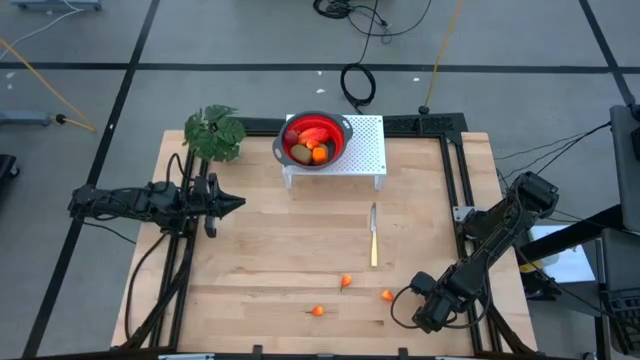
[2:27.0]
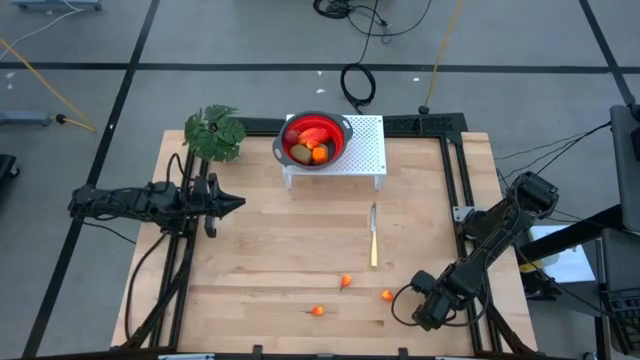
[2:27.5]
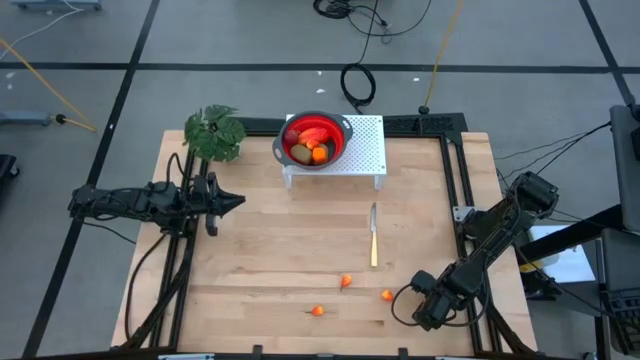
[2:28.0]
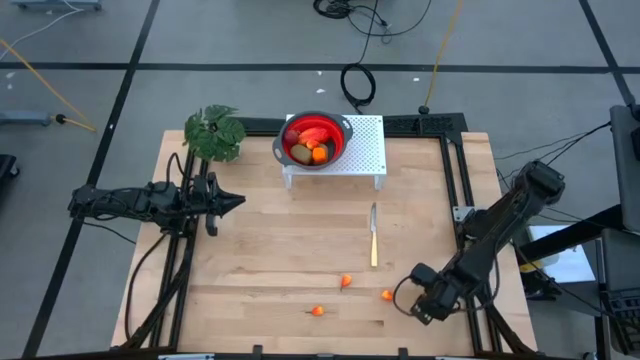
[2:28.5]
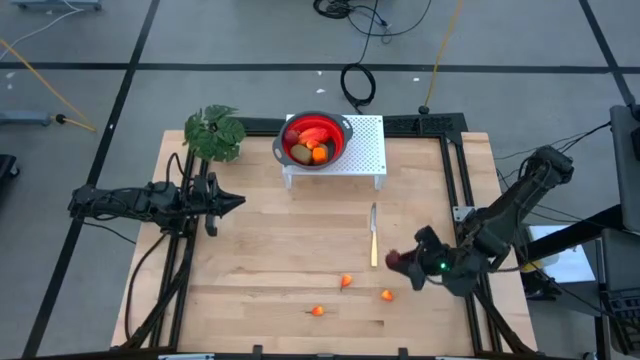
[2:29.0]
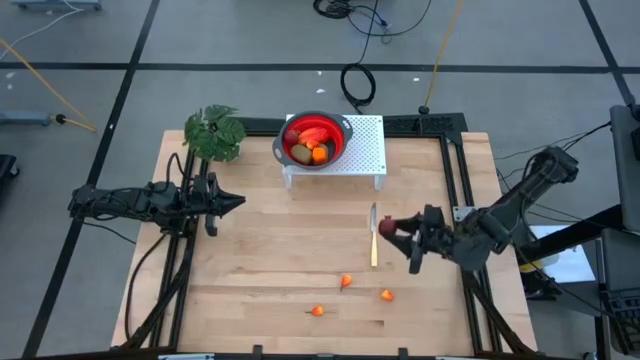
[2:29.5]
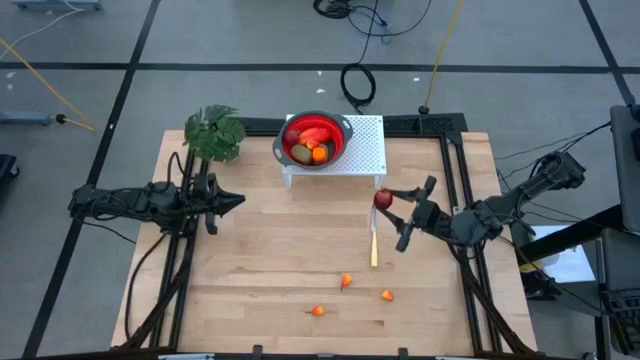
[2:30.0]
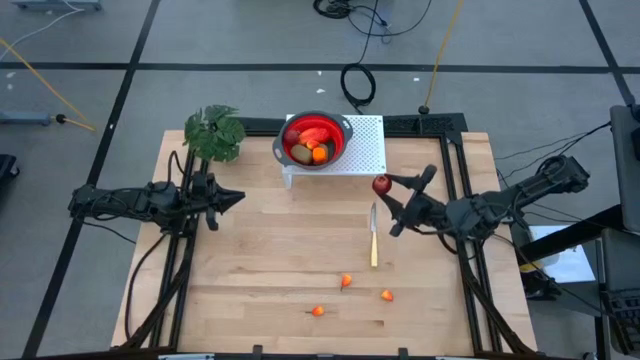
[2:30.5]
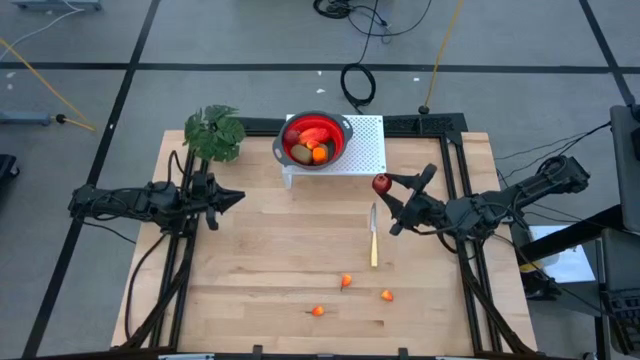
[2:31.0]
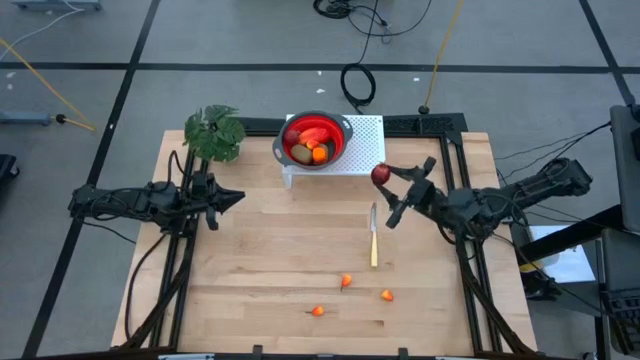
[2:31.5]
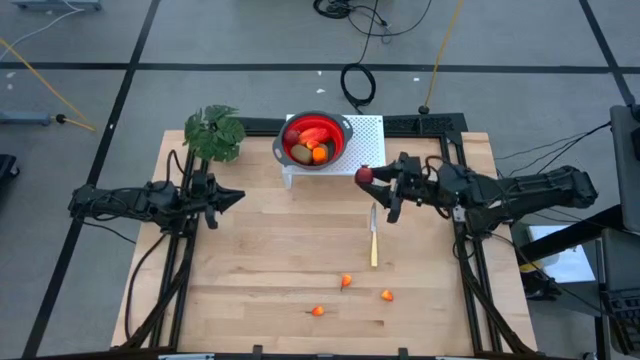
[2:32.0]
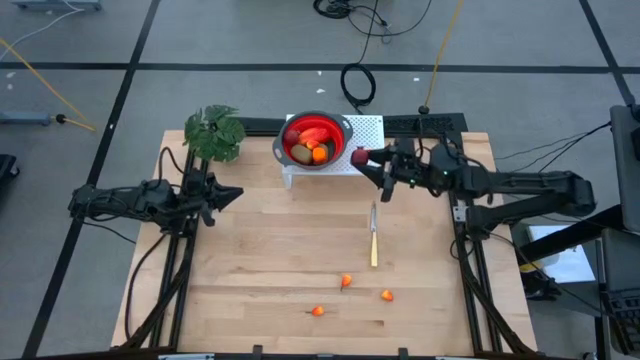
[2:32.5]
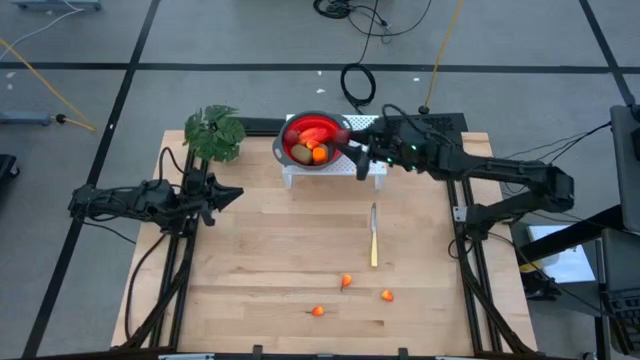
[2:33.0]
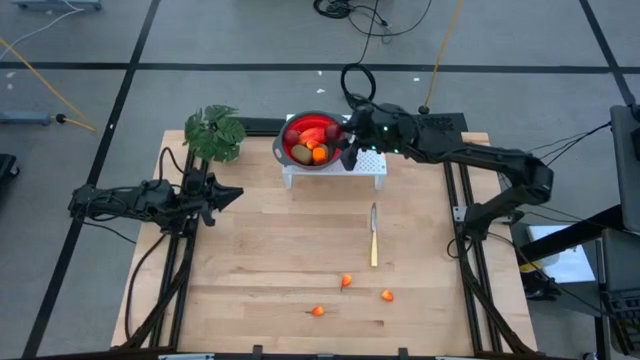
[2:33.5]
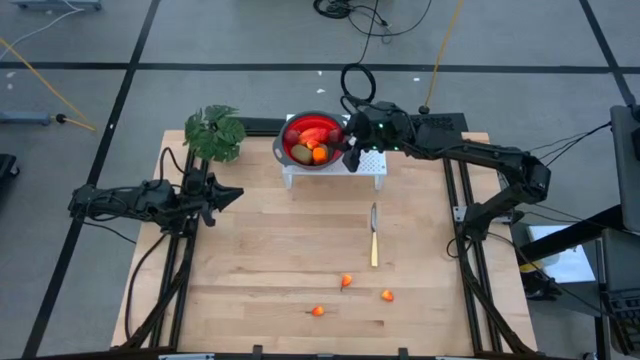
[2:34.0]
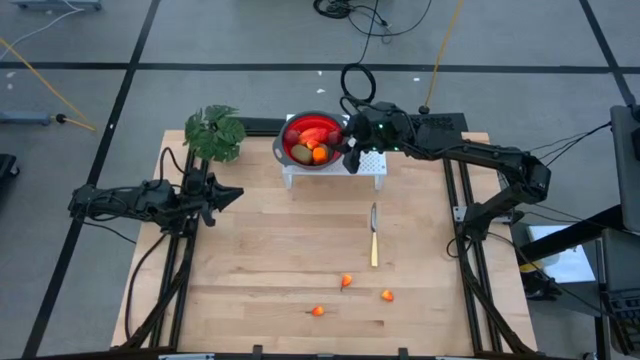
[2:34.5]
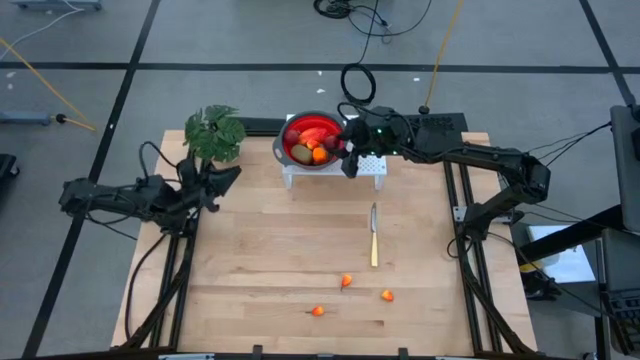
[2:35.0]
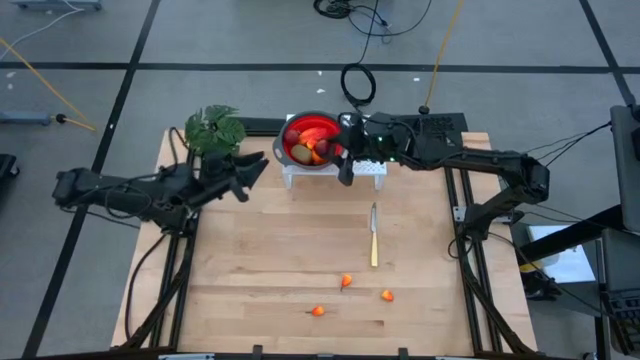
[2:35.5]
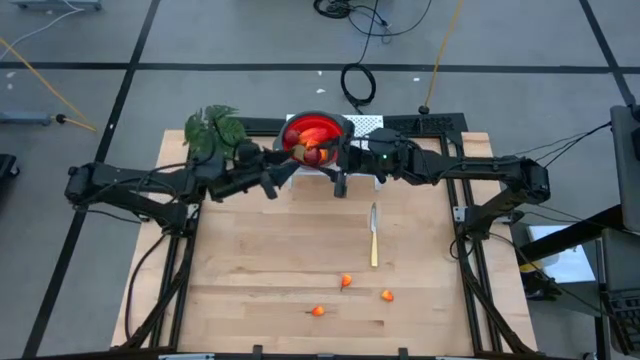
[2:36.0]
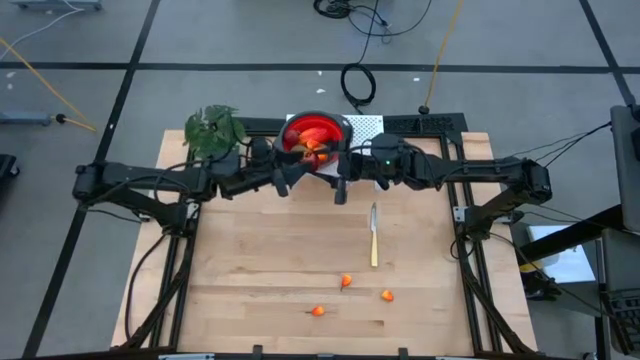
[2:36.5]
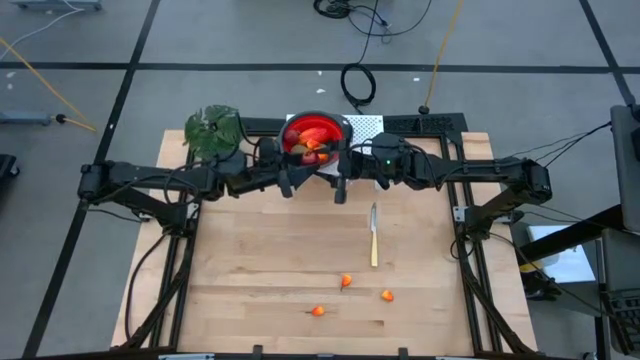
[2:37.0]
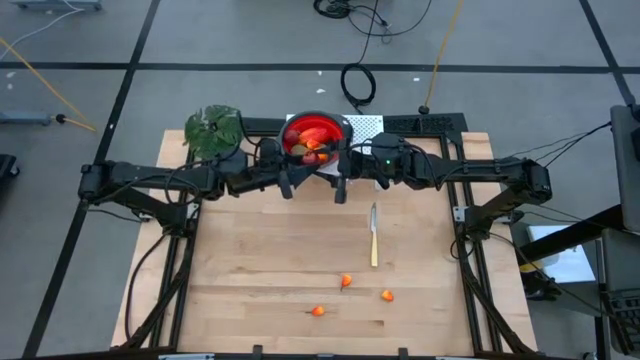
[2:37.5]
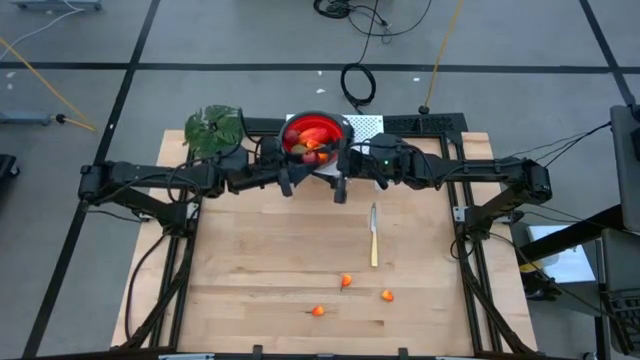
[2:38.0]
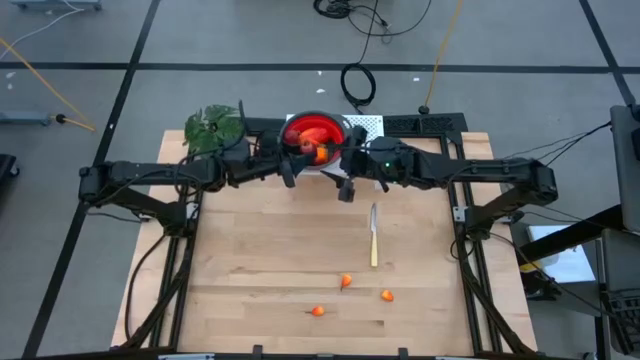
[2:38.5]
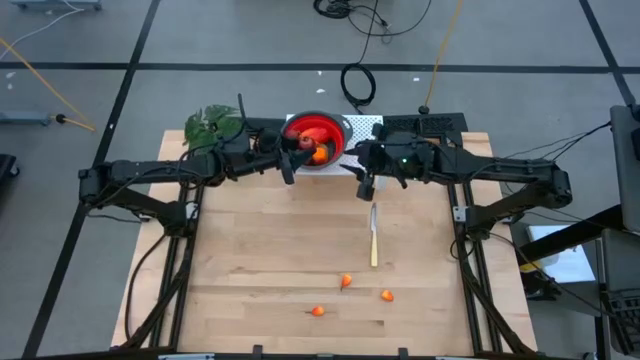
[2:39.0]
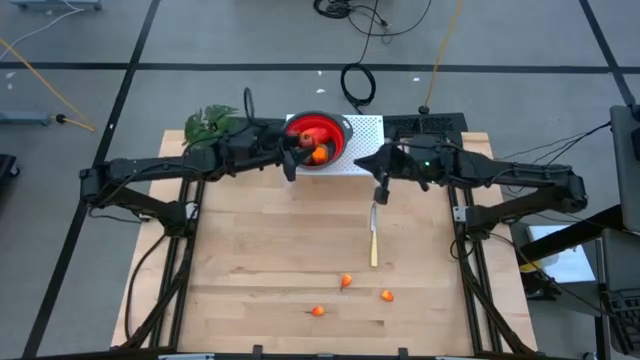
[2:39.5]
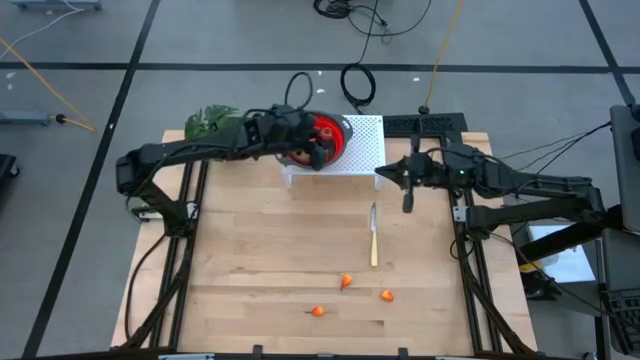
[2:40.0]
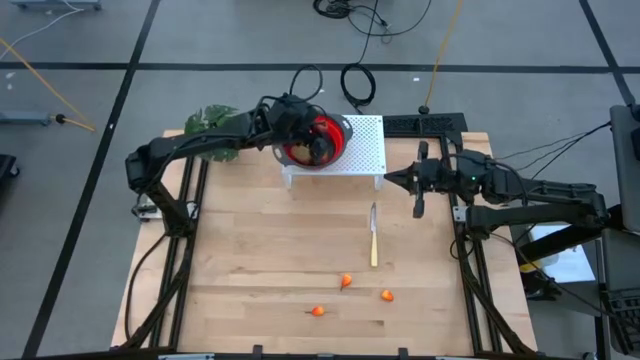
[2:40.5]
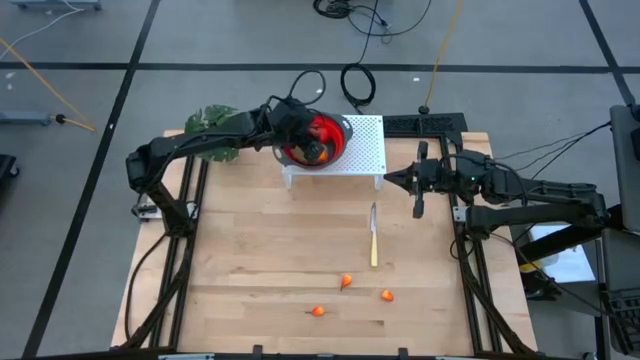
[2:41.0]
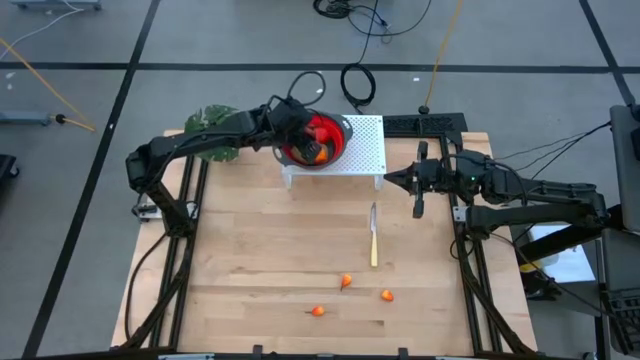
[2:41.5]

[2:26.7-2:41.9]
Task: Pick & Place Fruit
Put the red pomegranate into the red strainer bowl on the shelf
